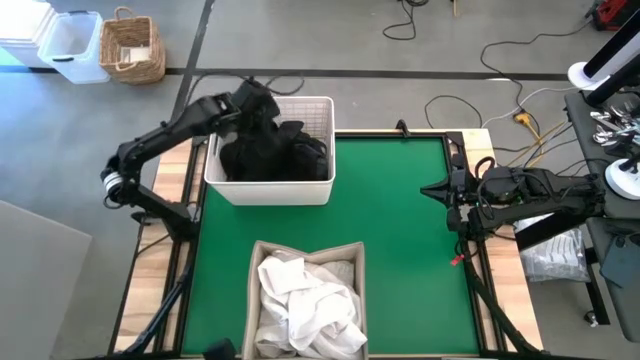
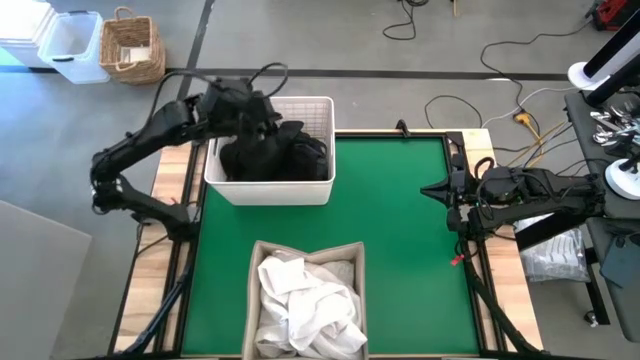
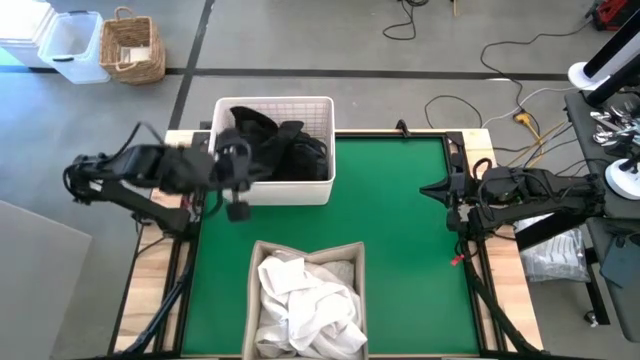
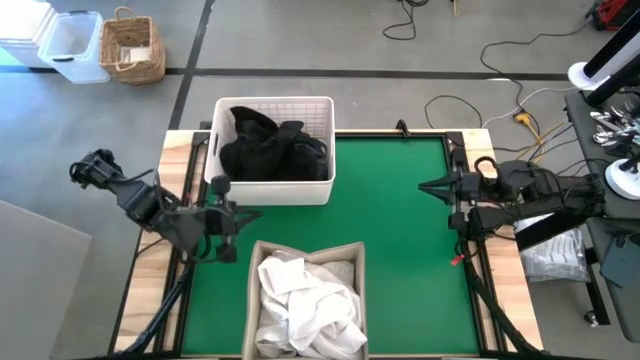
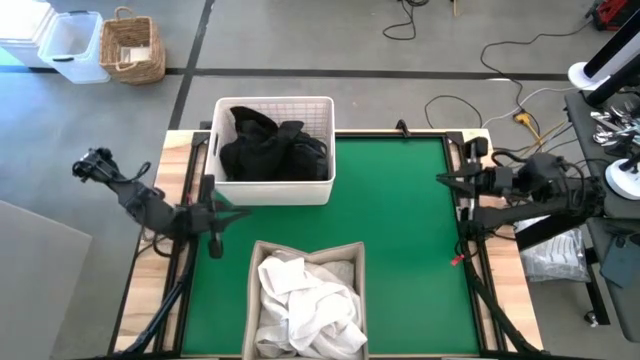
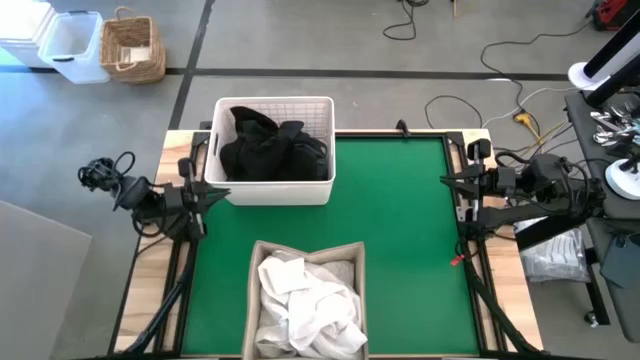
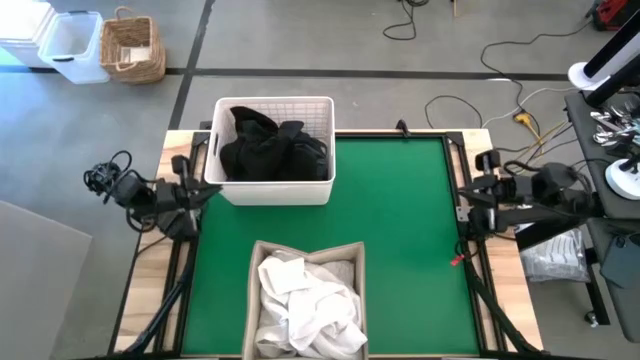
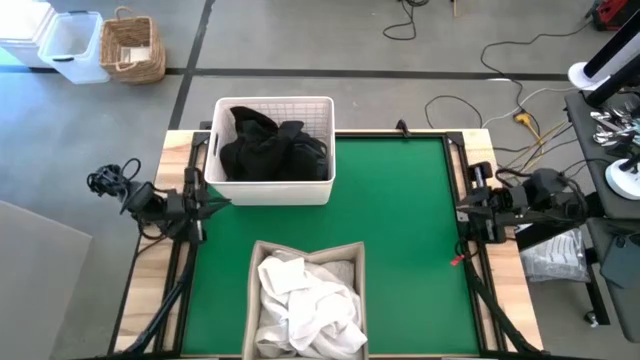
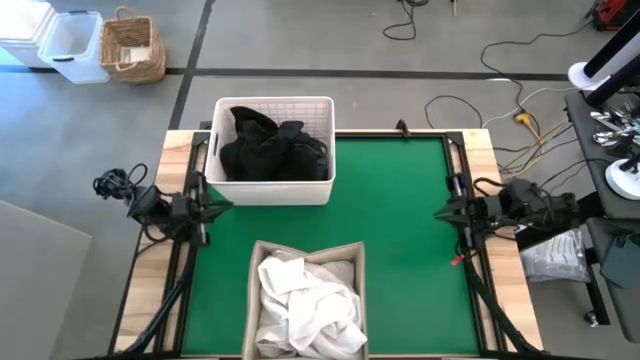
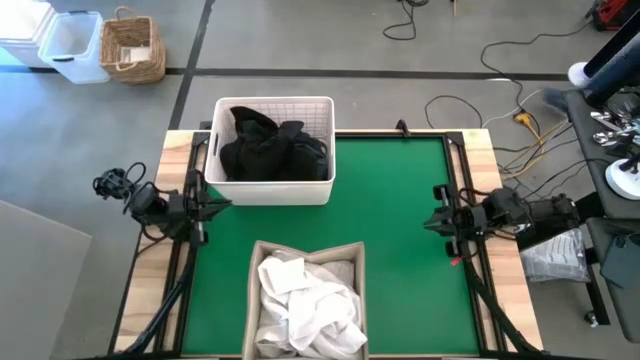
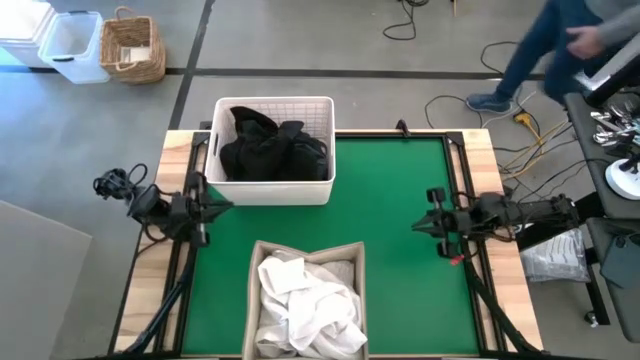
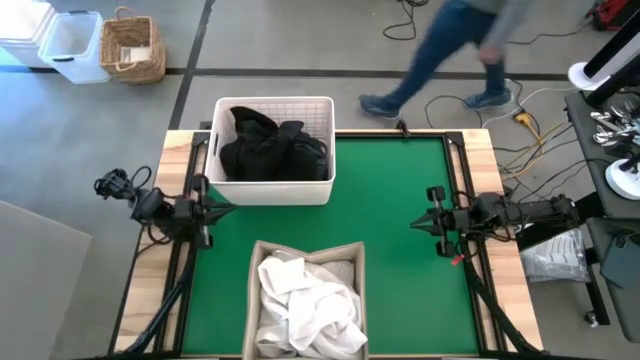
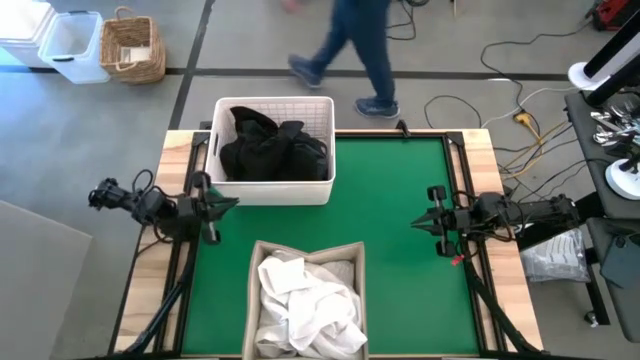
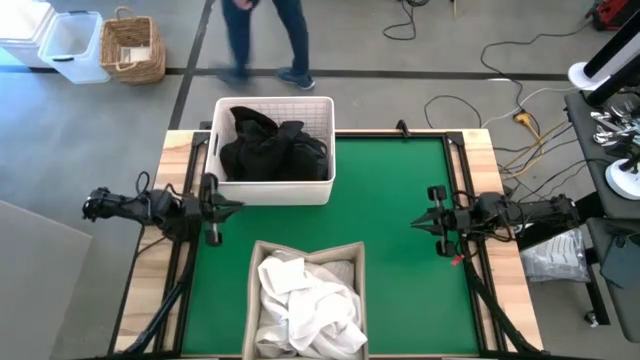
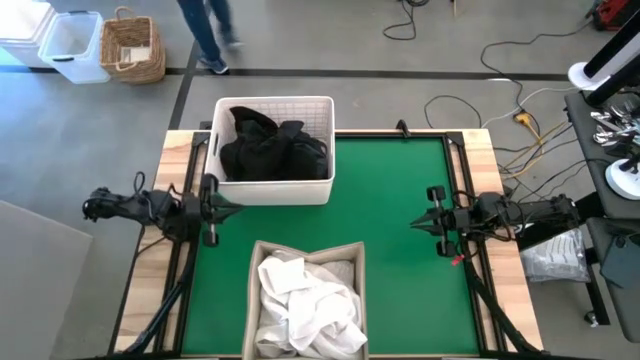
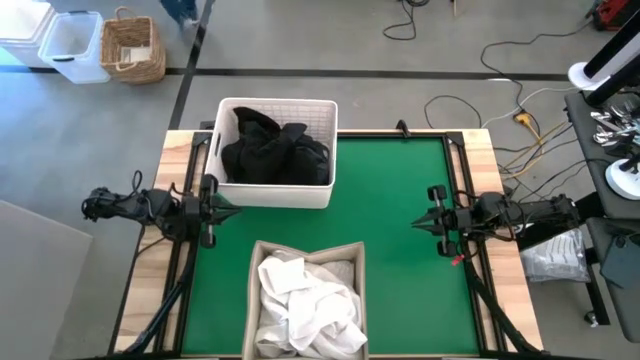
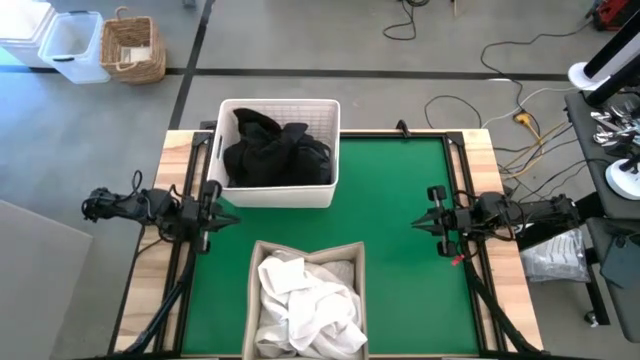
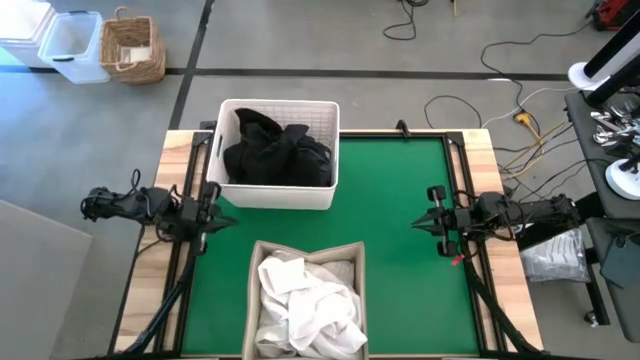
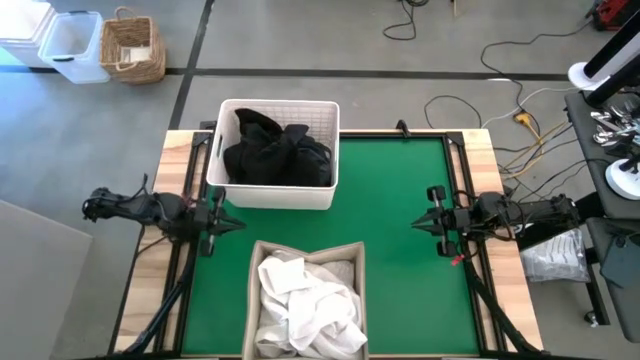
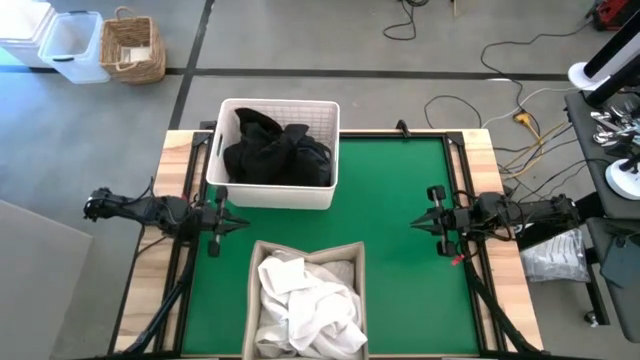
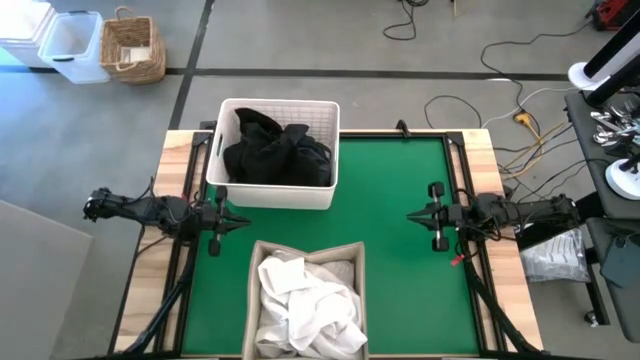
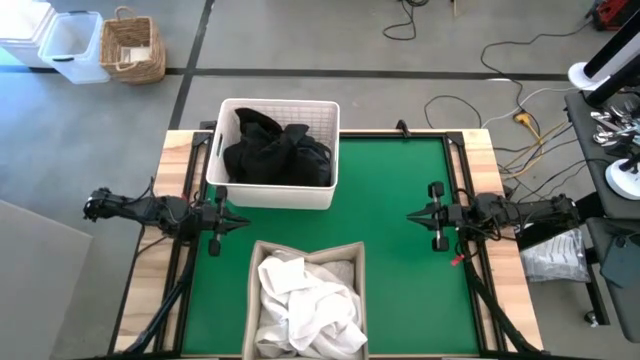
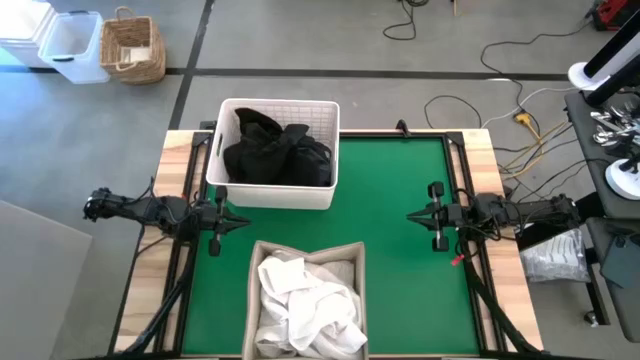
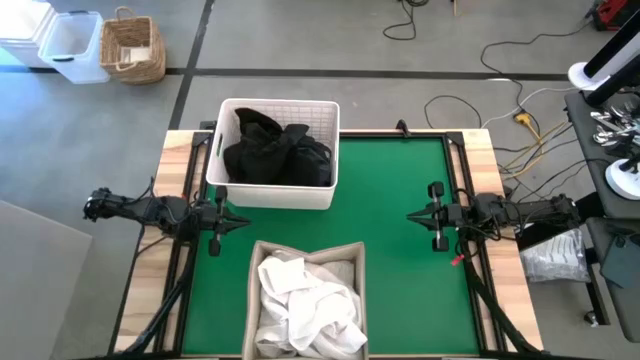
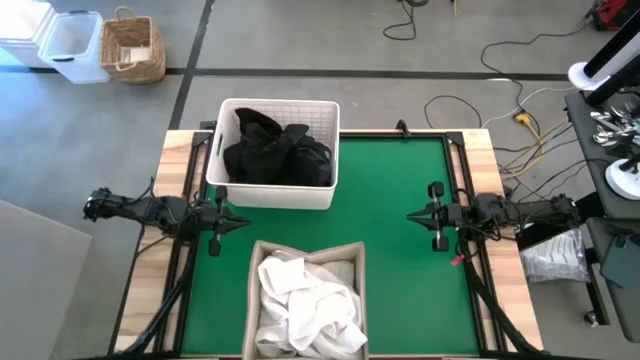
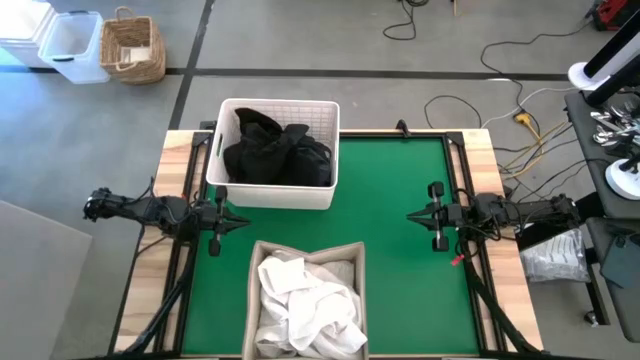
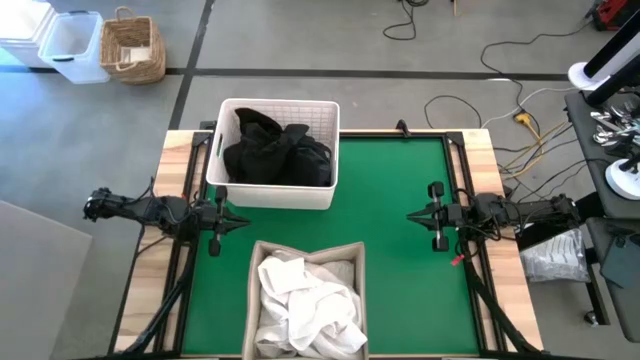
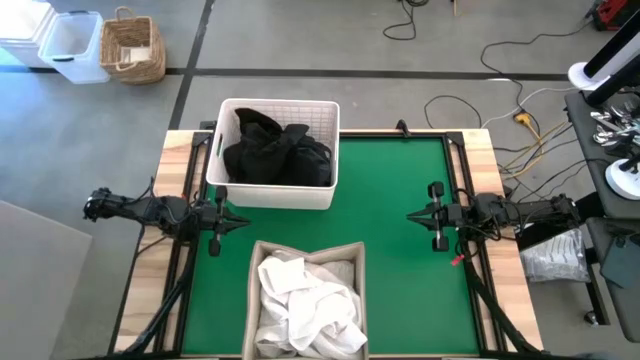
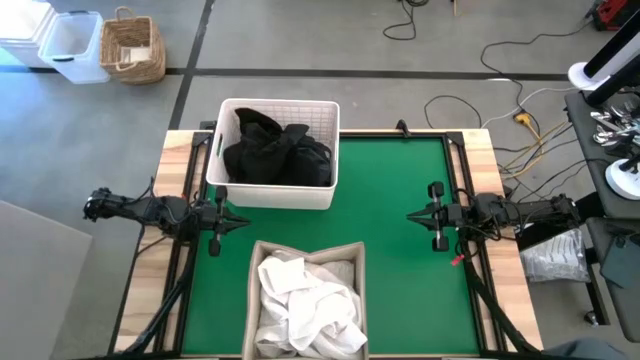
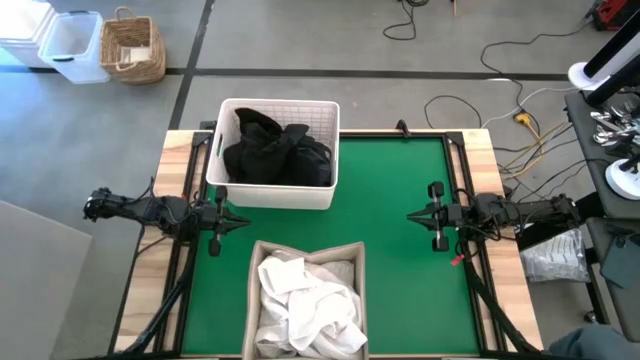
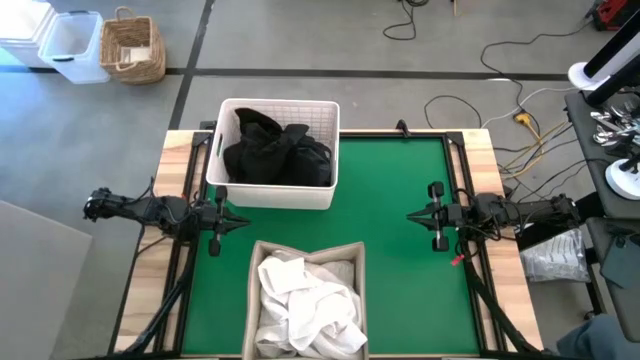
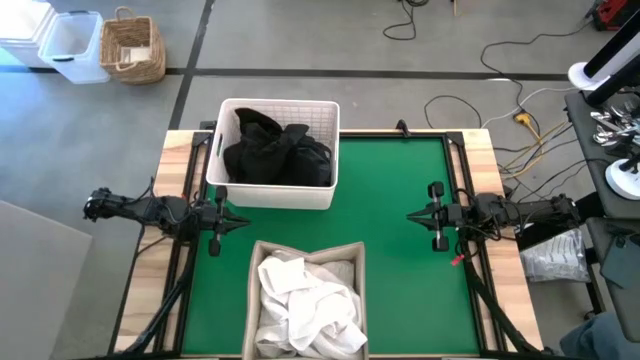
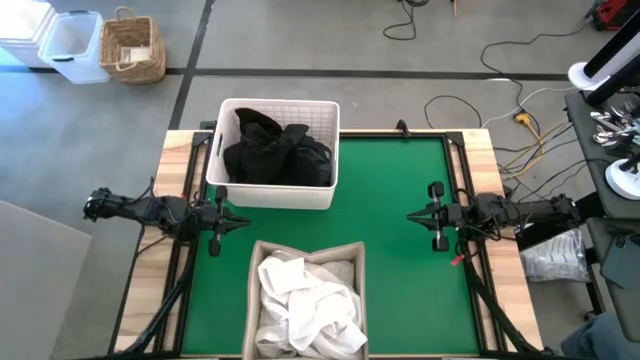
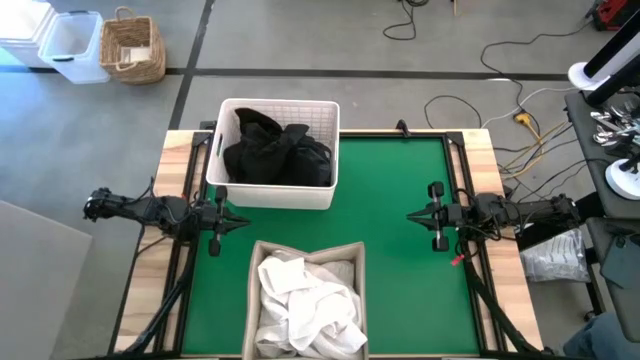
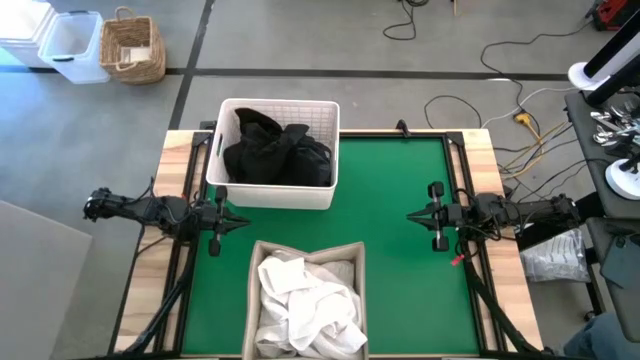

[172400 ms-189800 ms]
Return to Home Position
